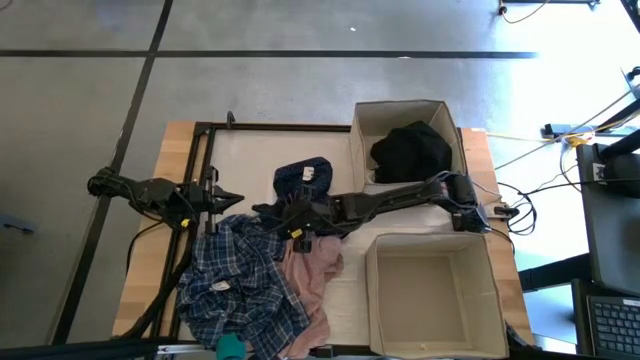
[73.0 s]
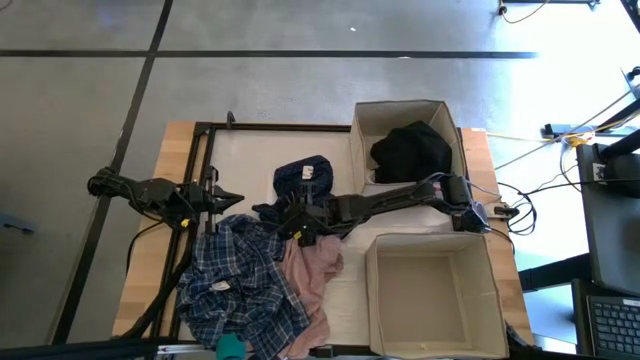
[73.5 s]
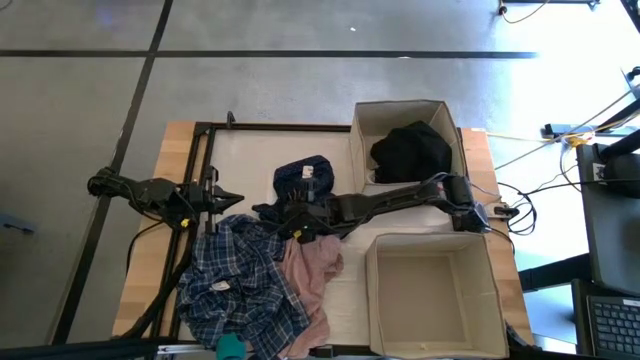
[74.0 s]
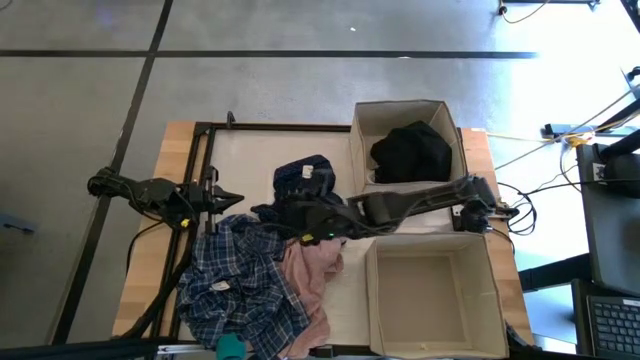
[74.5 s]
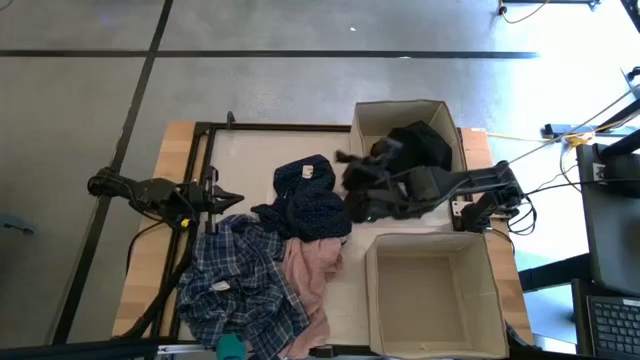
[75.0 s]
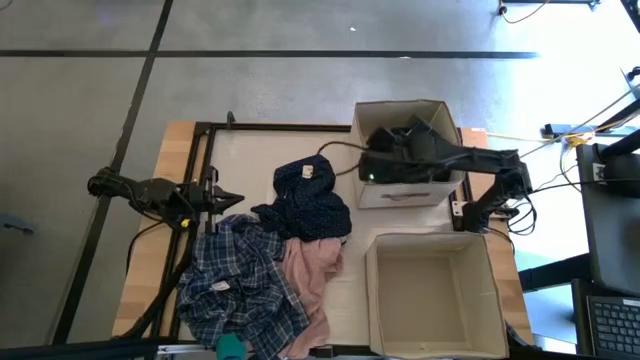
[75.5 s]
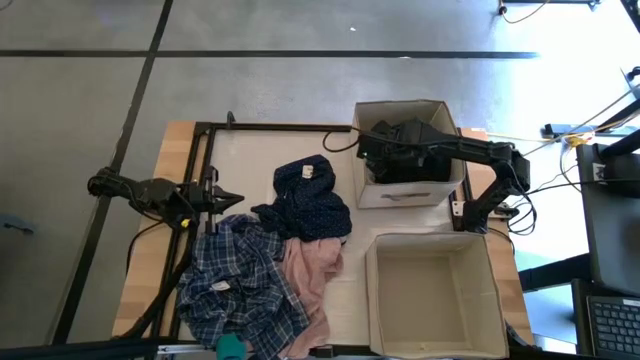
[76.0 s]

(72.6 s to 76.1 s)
Task: Sort clothes
Put the black striped sock into the top laundry organizer

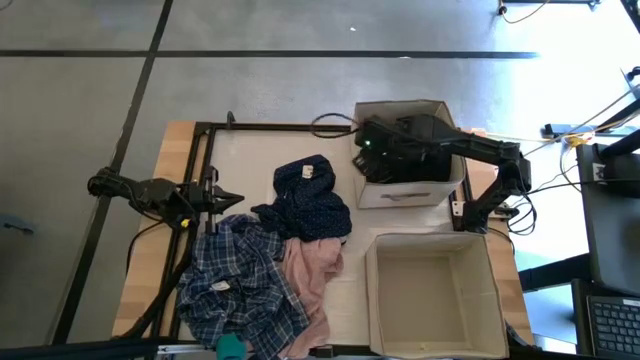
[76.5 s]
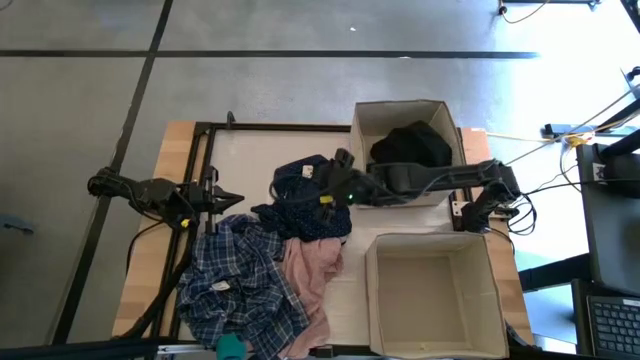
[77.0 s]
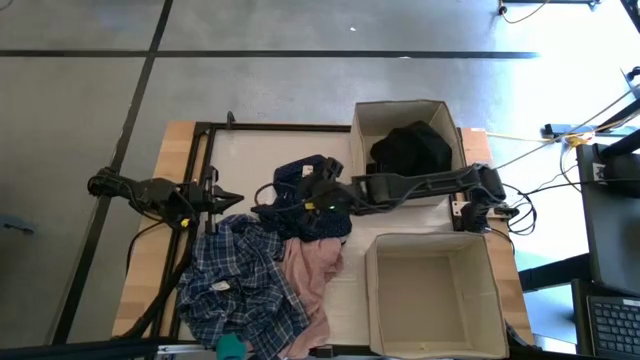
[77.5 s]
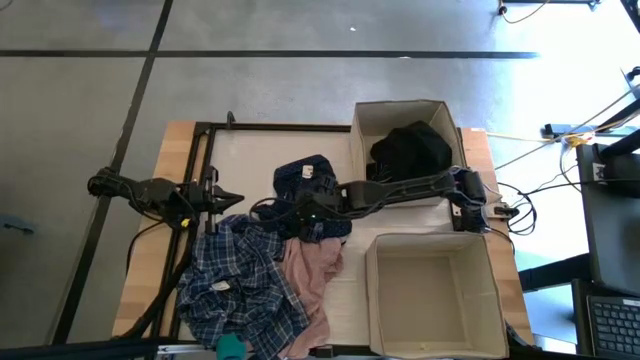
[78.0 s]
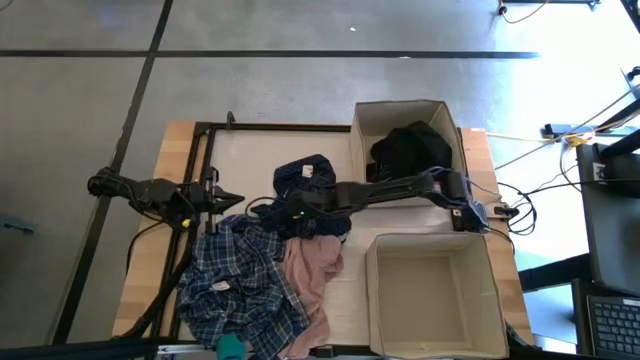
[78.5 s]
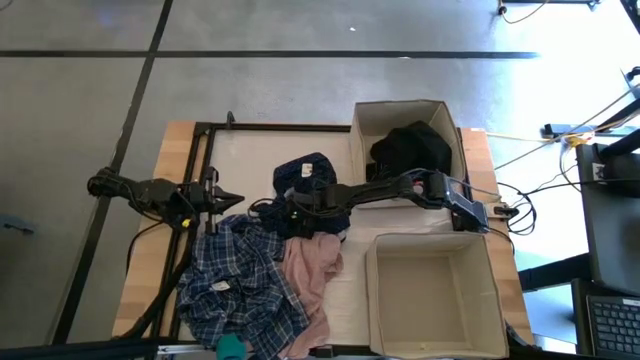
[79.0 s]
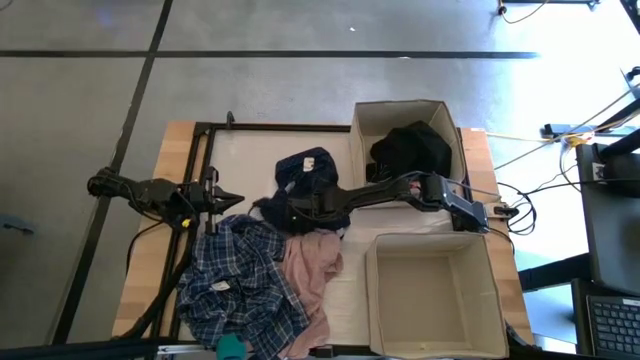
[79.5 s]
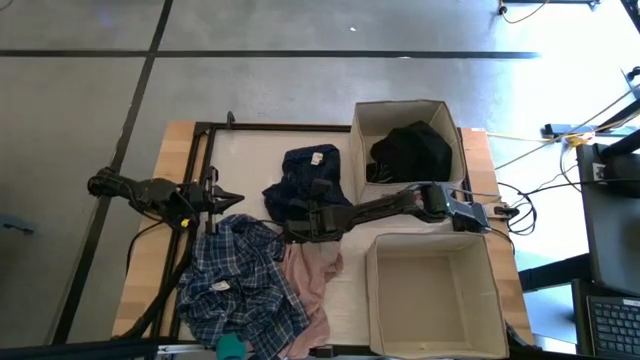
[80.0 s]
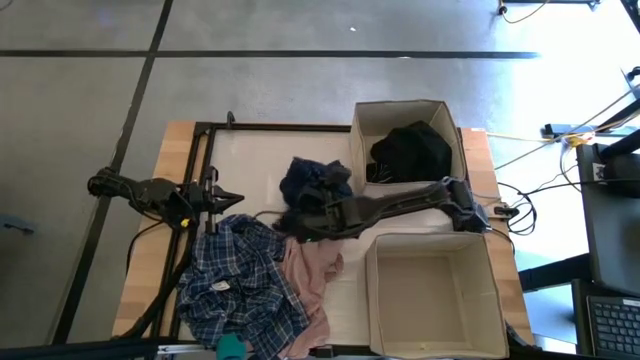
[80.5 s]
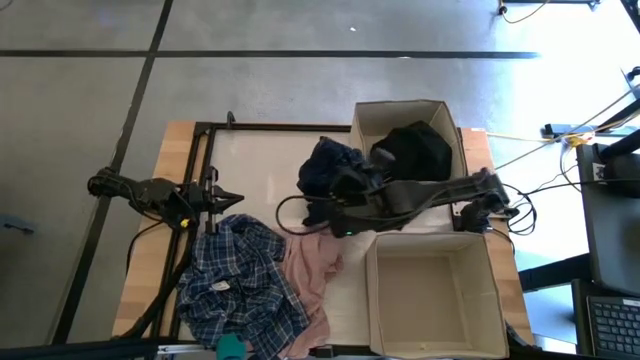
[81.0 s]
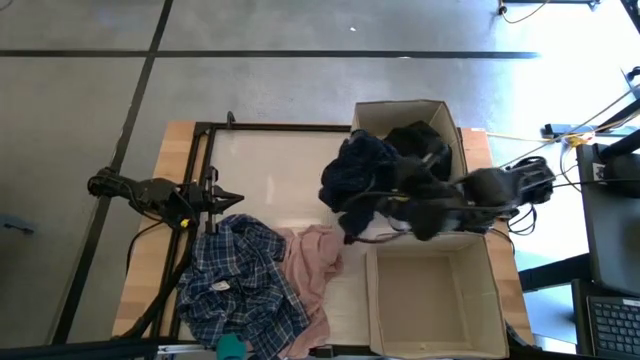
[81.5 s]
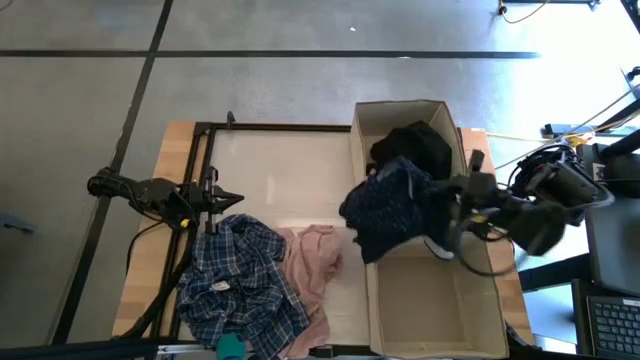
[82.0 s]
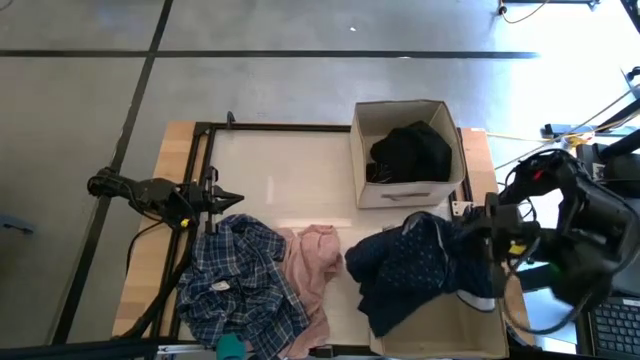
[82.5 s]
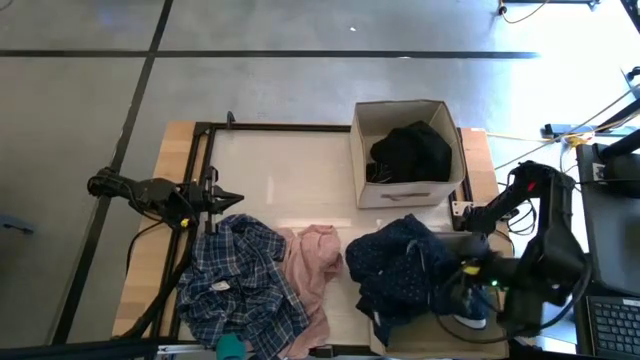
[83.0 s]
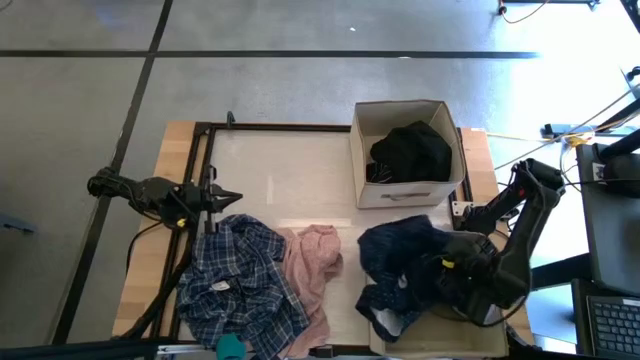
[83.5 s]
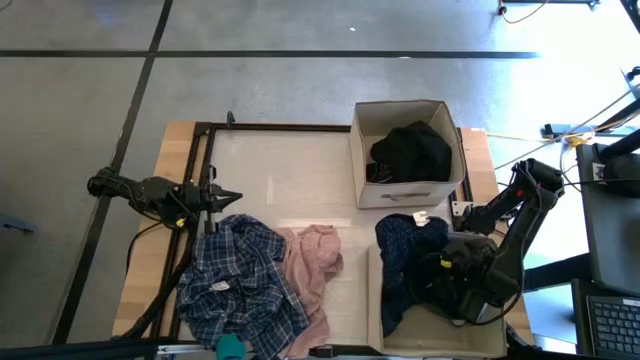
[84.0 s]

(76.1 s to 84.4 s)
Put the blue shirt into the bottom laundry organizer

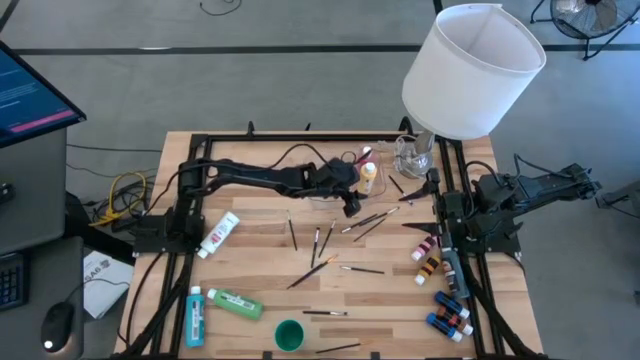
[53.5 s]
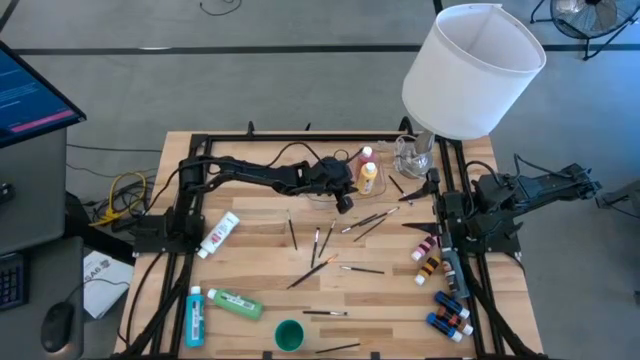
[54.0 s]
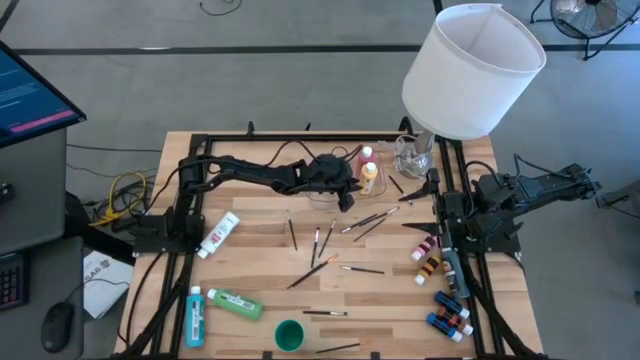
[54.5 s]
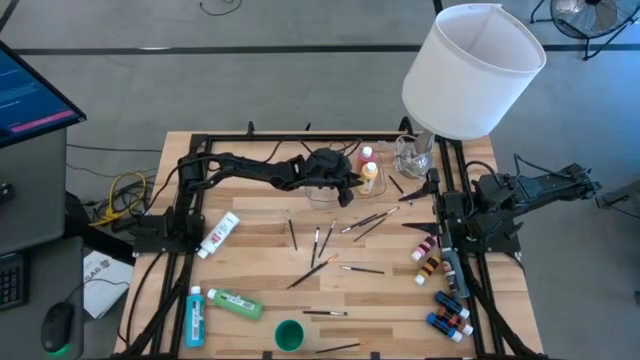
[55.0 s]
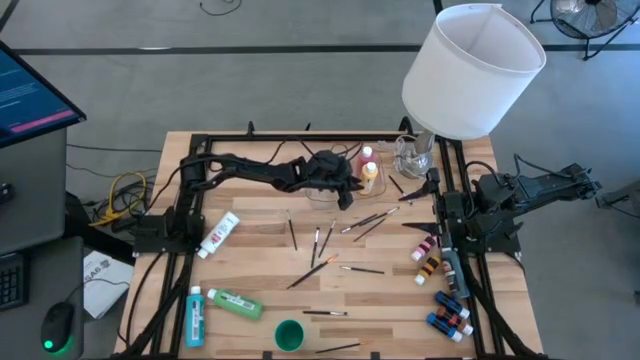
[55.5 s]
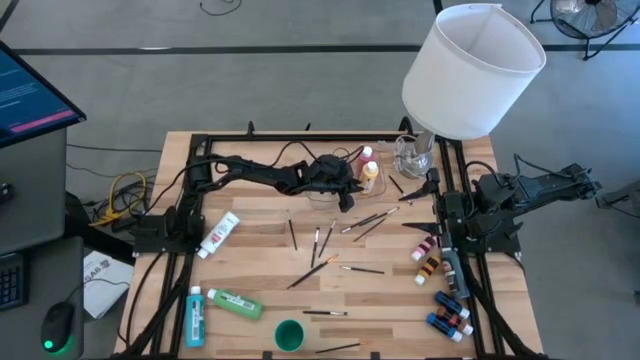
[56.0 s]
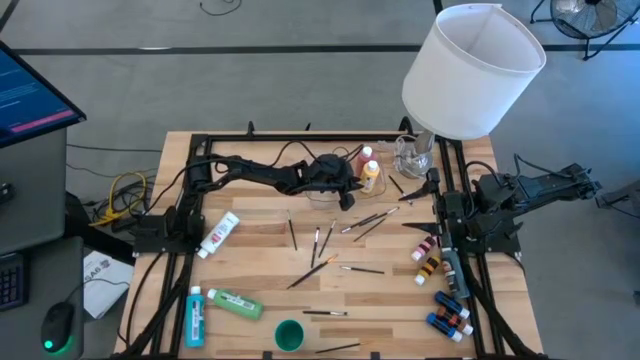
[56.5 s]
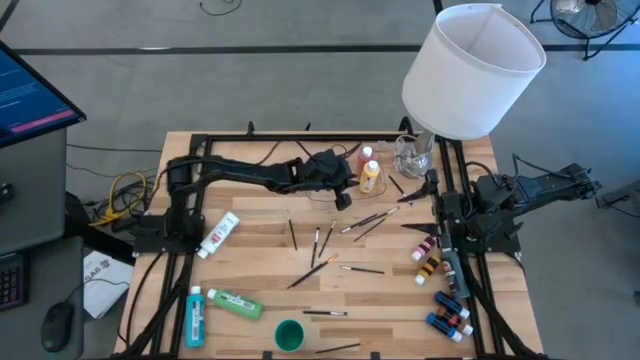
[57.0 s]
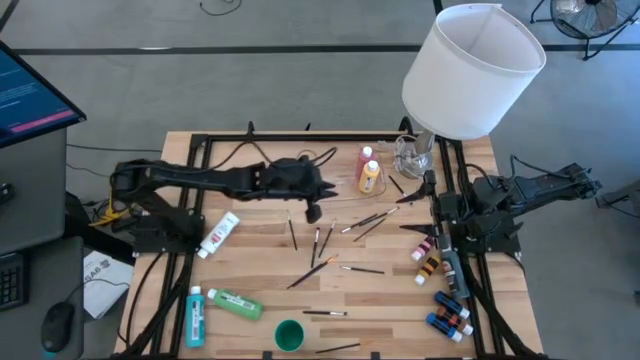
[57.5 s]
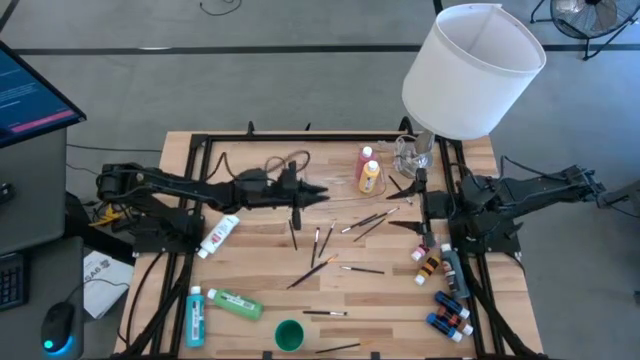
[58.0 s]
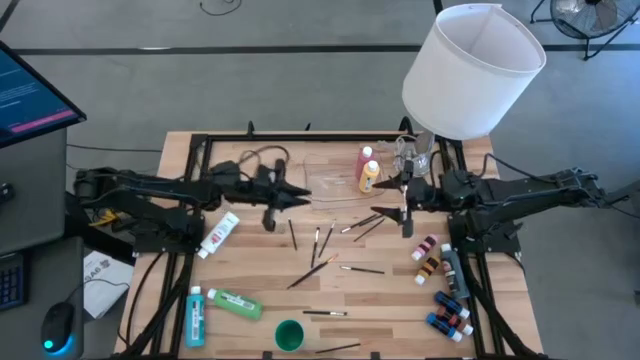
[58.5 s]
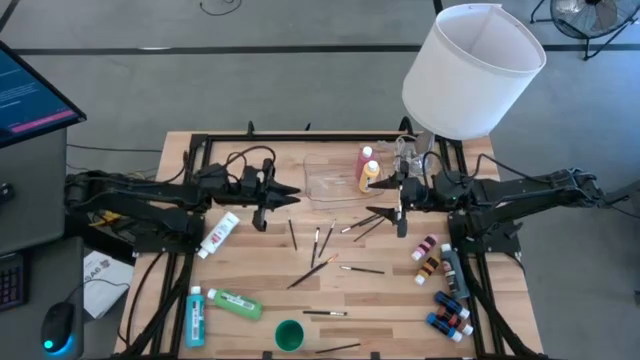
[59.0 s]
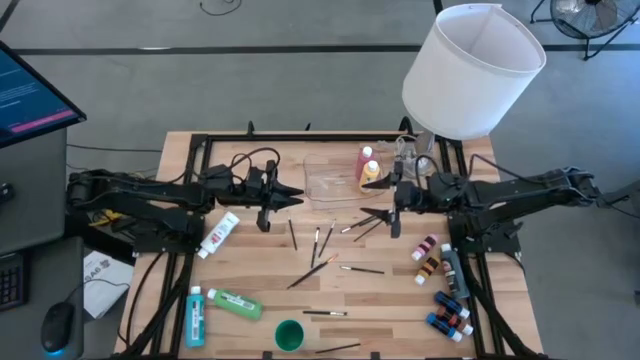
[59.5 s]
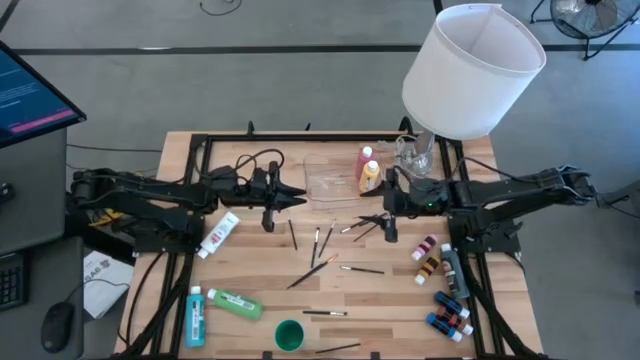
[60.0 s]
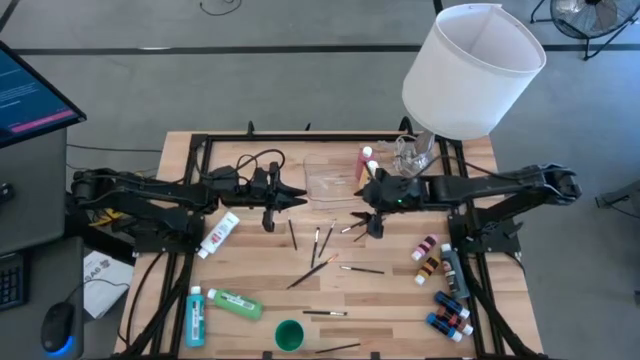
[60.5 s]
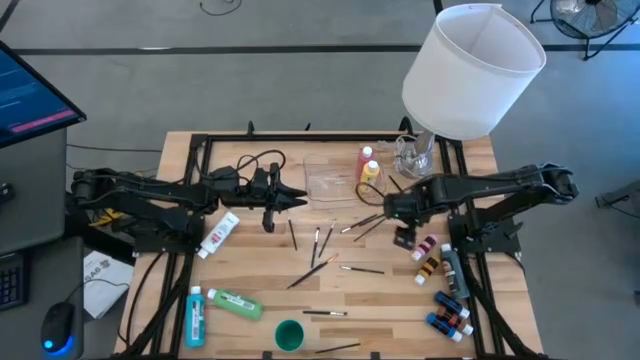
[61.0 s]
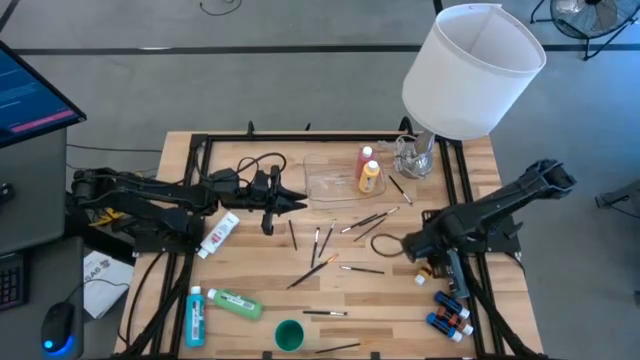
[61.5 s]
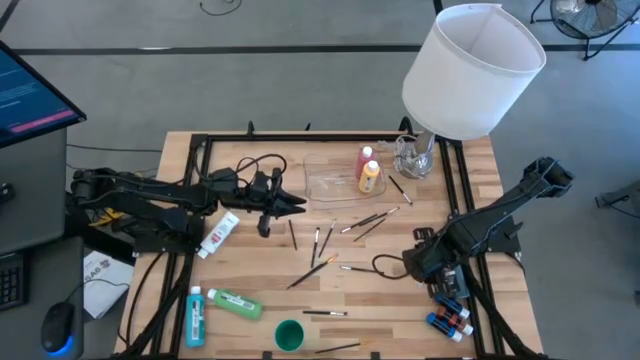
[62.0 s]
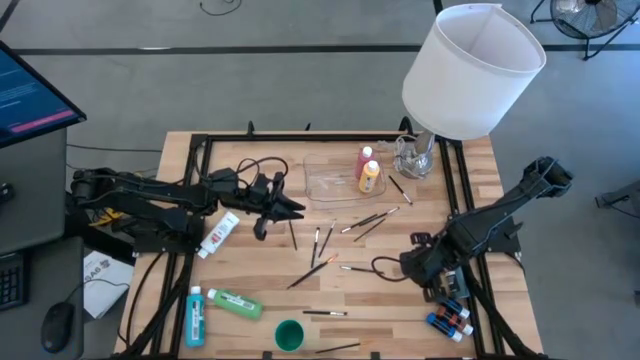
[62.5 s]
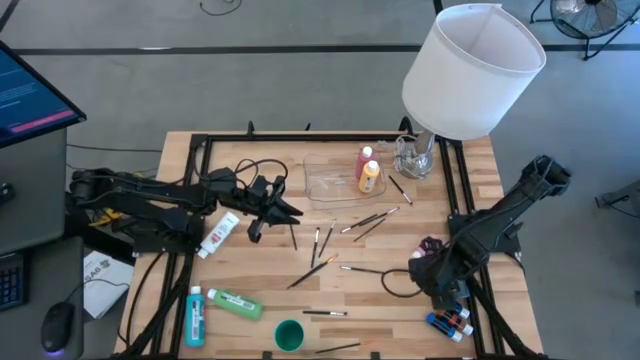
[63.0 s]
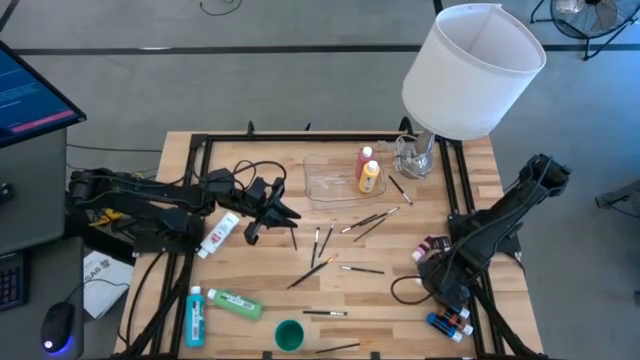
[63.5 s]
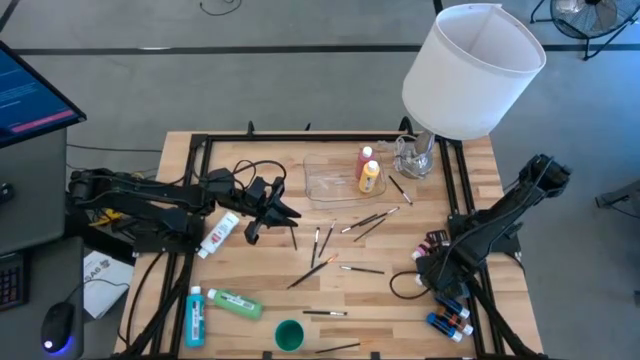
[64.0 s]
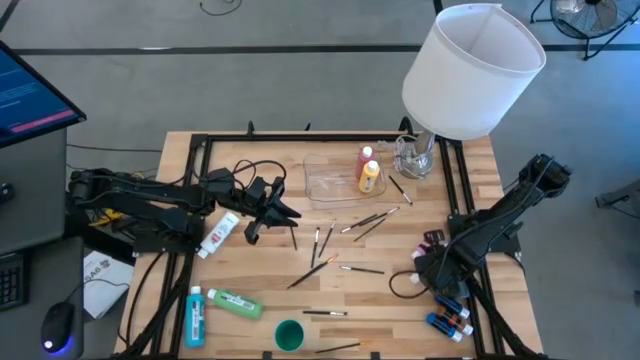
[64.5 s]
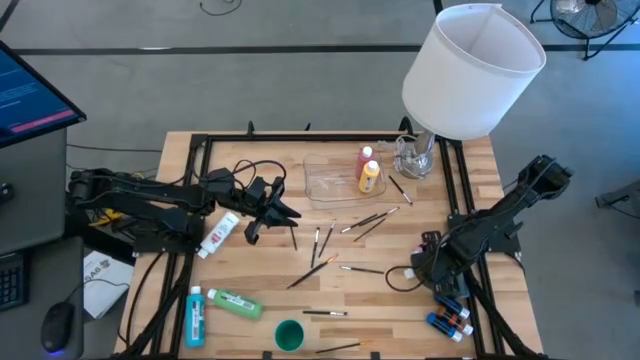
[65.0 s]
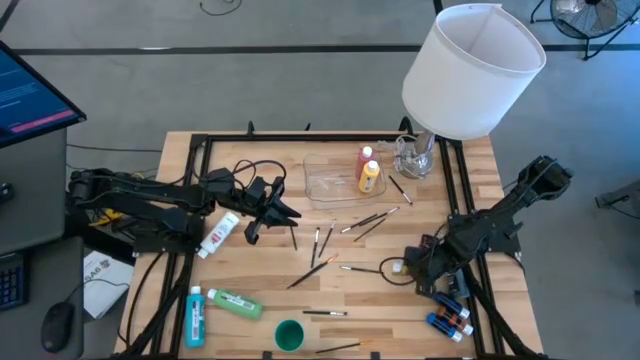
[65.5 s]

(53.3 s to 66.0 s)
Task: Pick & Place Paint Supplies
Put the small yellow paint bottle into the transparent bin
